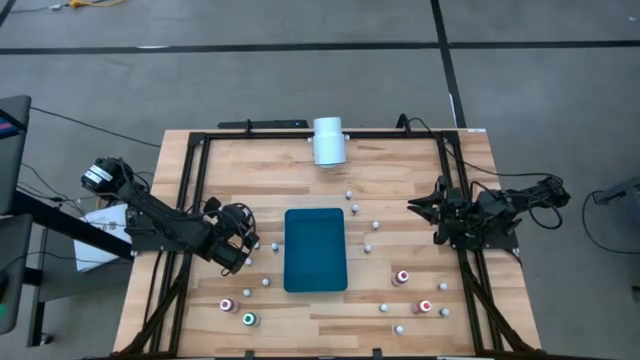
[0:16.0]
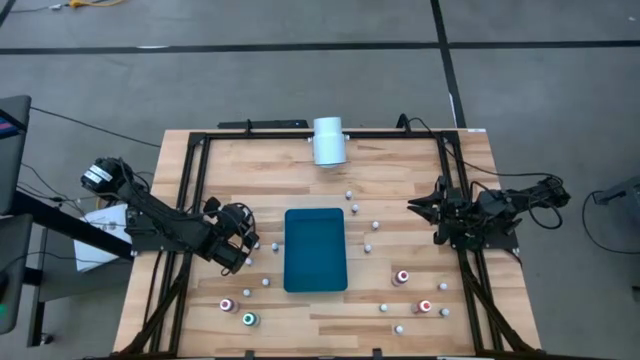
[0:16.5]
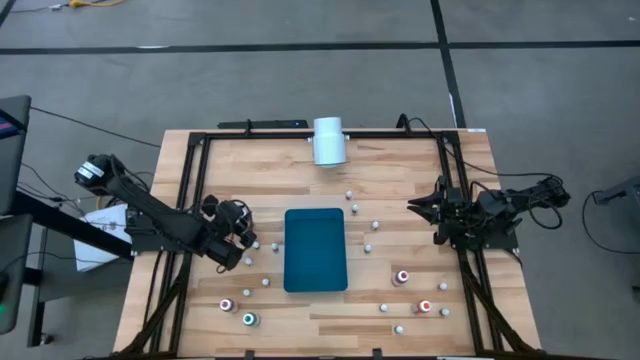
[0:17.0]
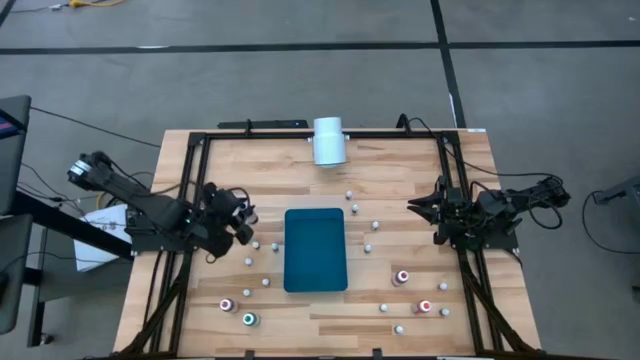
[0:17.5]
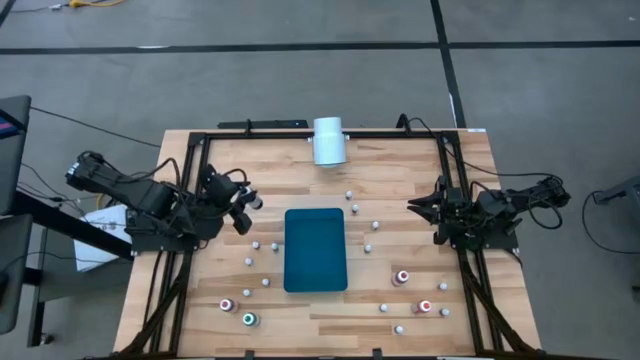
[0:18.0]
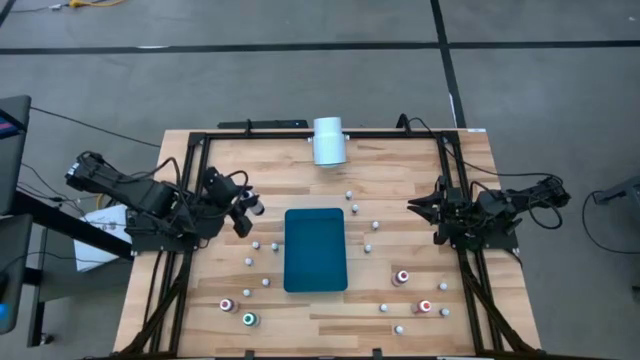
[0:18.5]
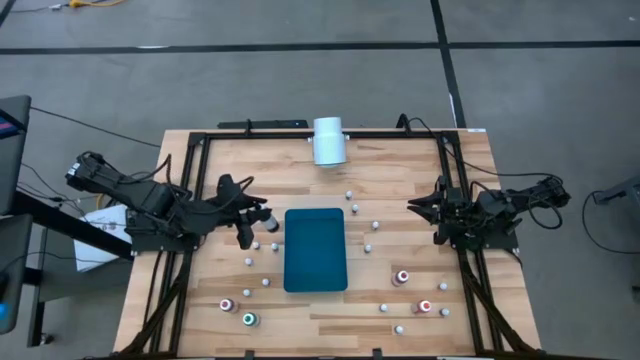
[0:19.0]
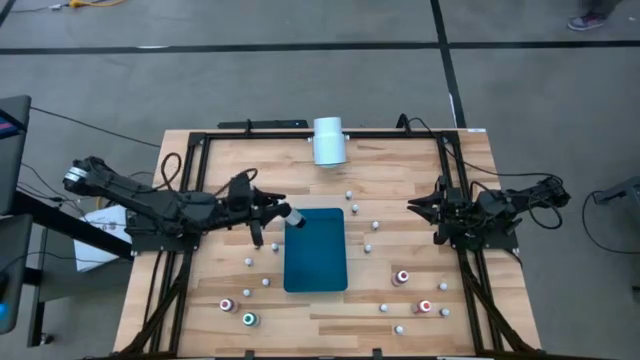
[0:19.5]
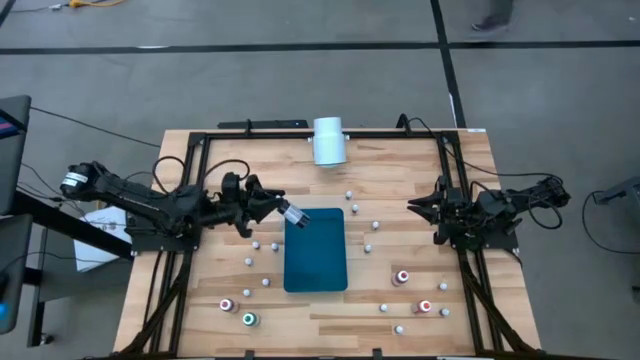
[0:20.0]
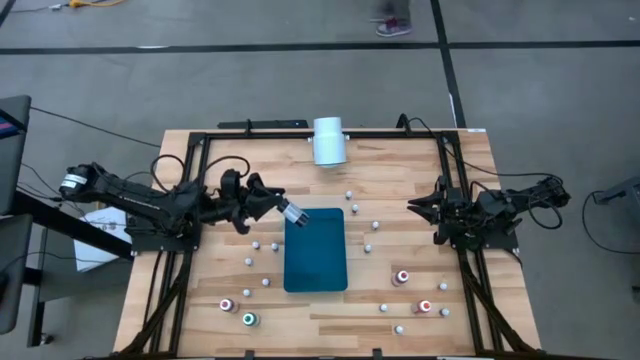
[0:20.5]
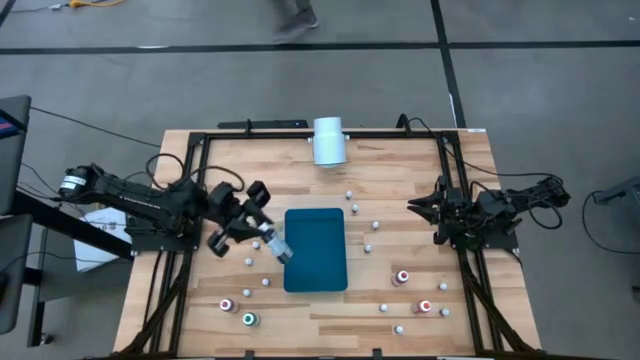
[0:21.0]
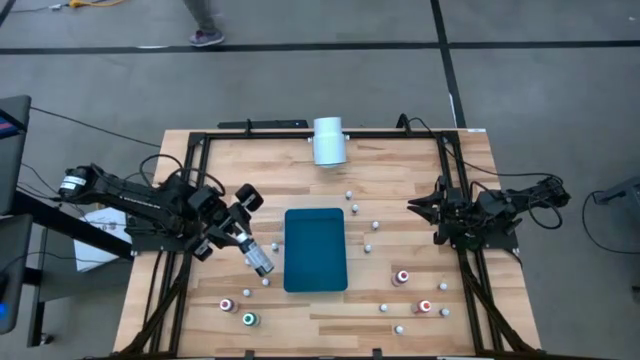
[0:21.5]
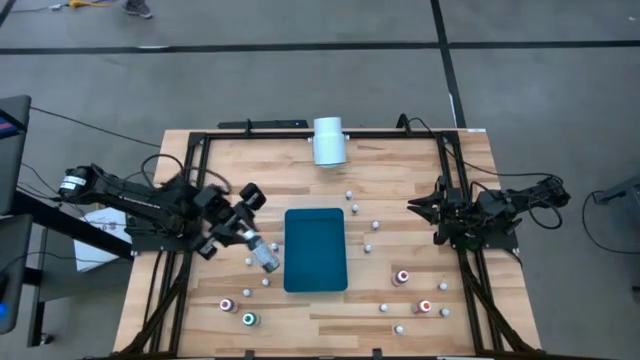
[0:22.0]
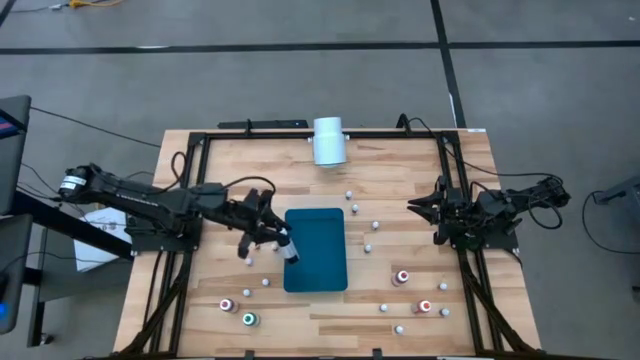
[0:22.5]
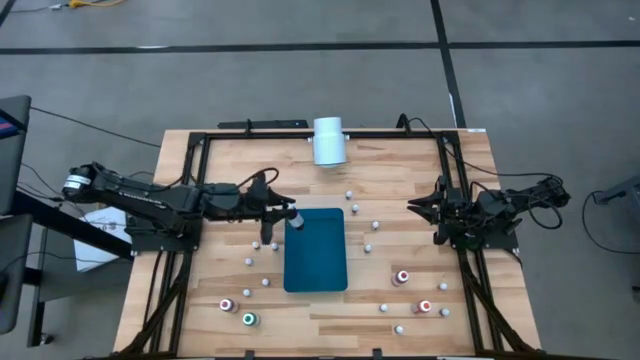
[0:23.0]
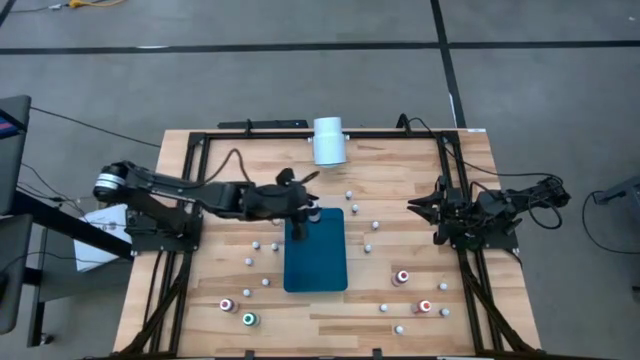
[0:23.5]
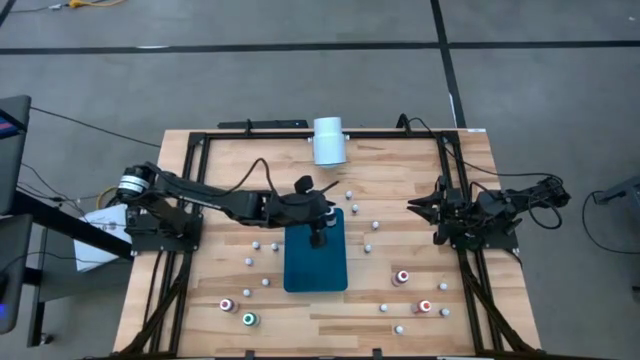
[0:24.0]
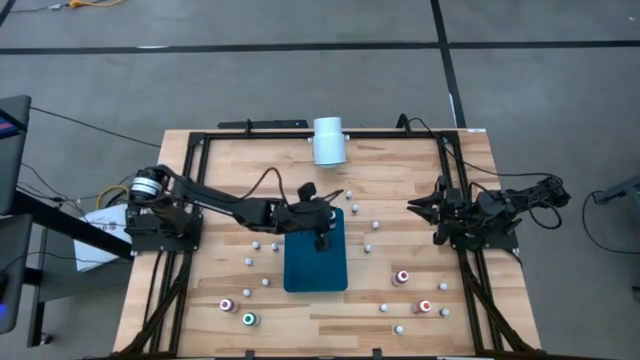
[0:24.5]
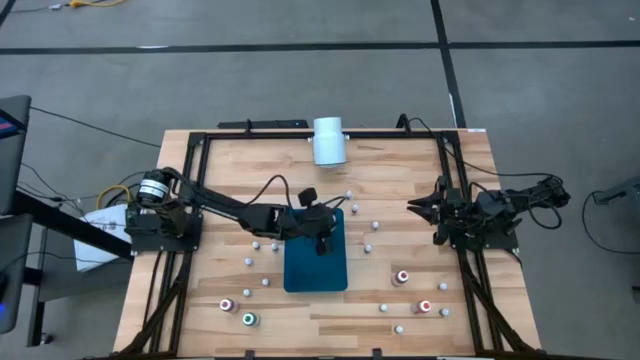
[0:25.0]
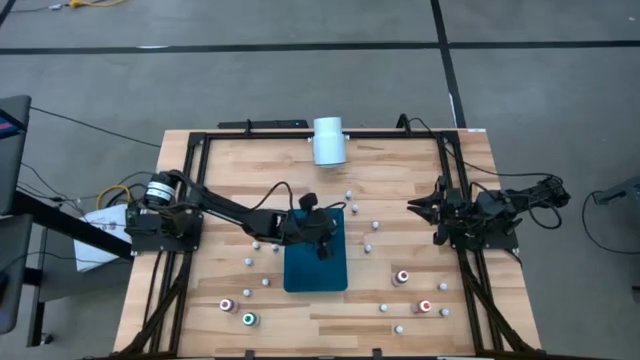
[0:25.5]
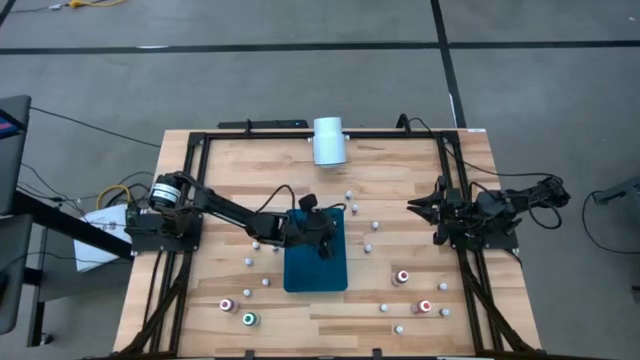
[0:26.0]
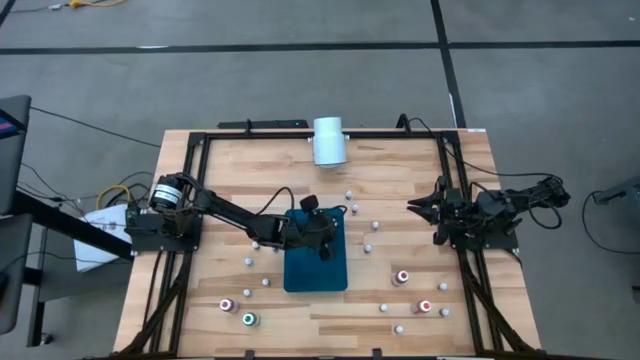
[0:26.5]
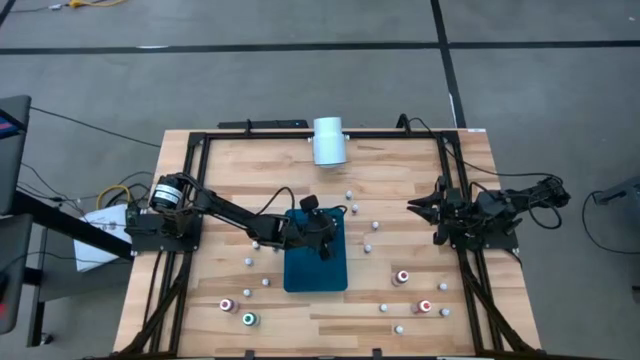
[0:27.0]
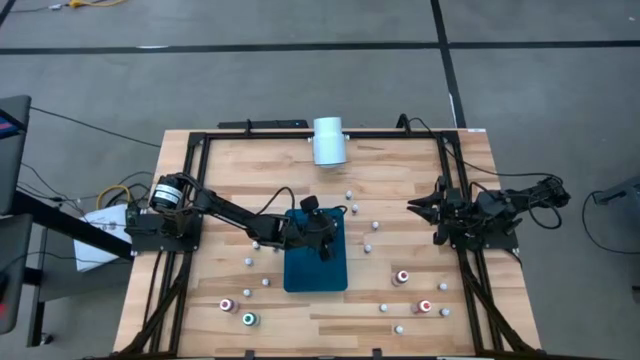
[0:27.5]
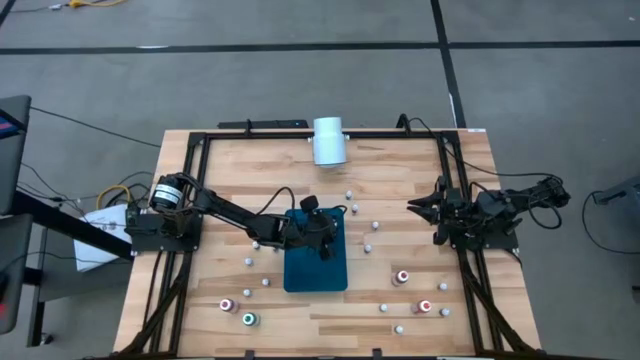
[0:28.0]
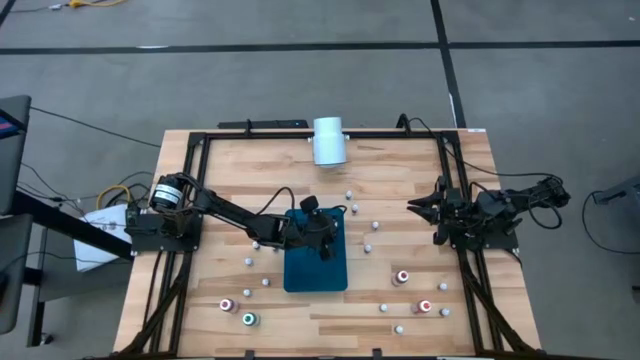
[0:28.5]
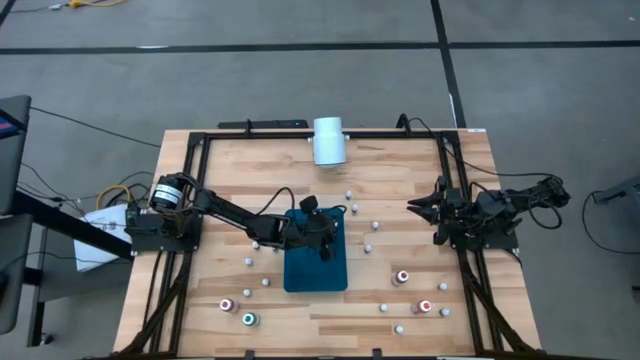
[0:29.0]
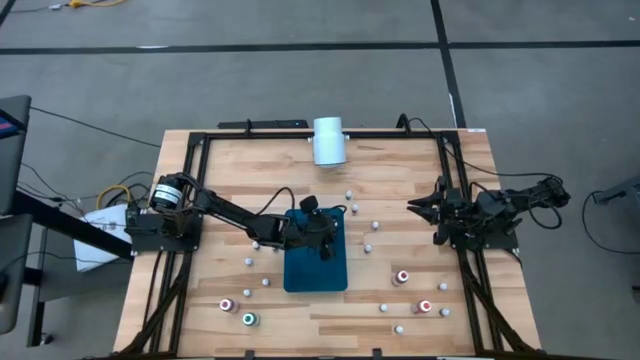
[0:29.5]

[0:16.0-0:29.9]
Task: Pick & Place food coloring
Put the big black food coloring bottle into the blue bin

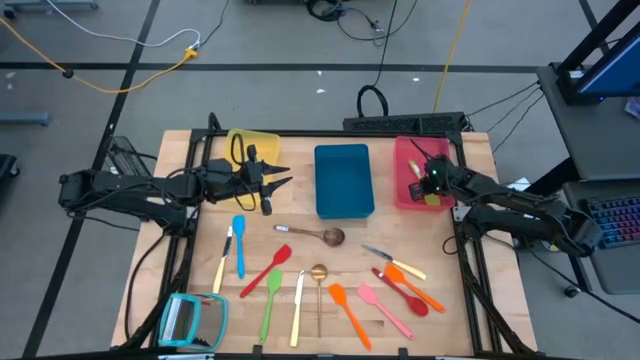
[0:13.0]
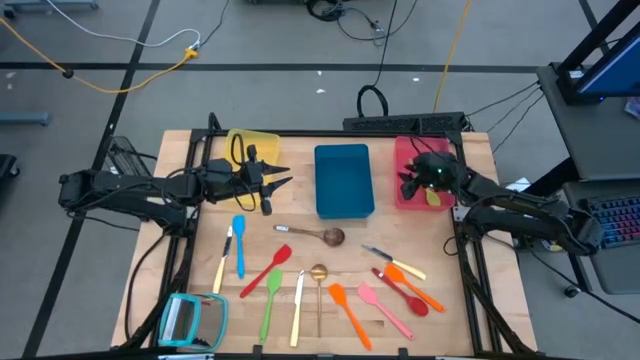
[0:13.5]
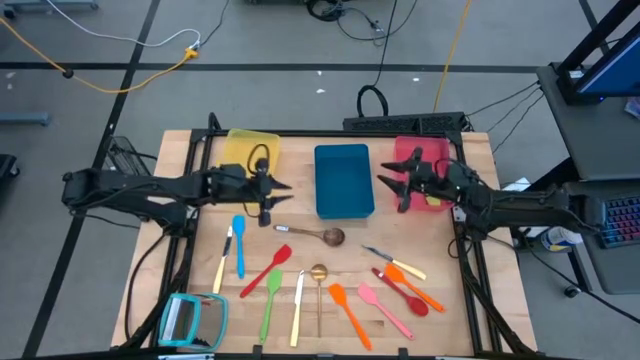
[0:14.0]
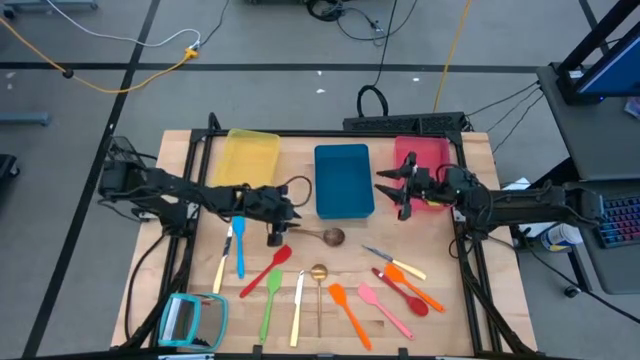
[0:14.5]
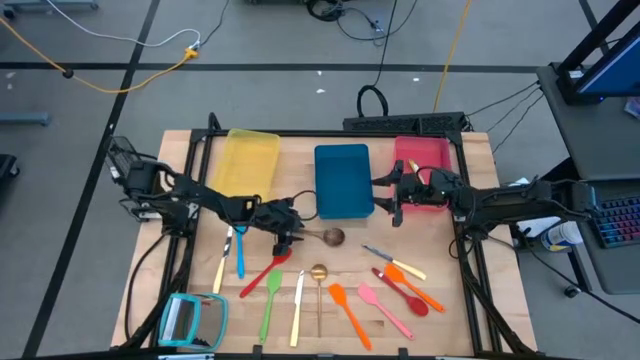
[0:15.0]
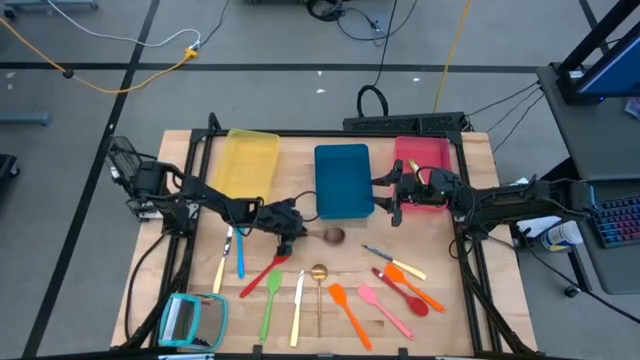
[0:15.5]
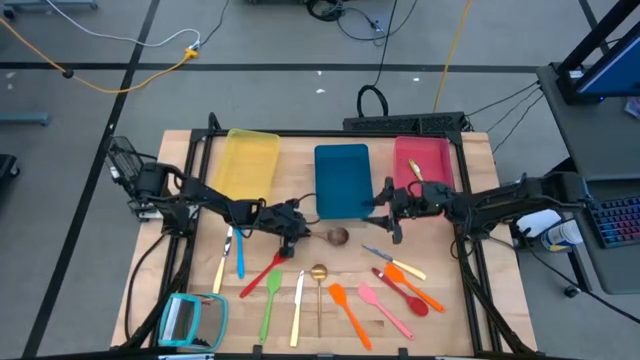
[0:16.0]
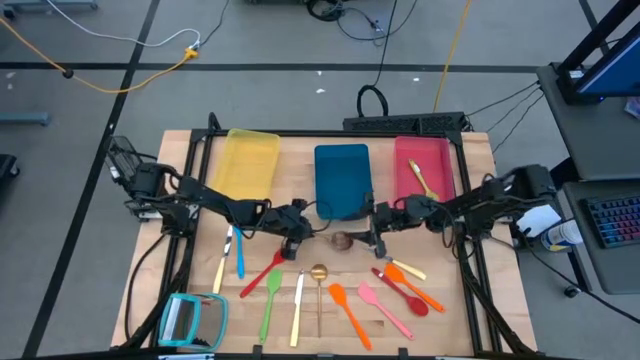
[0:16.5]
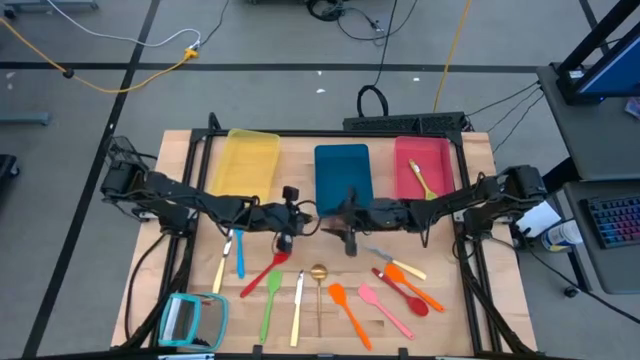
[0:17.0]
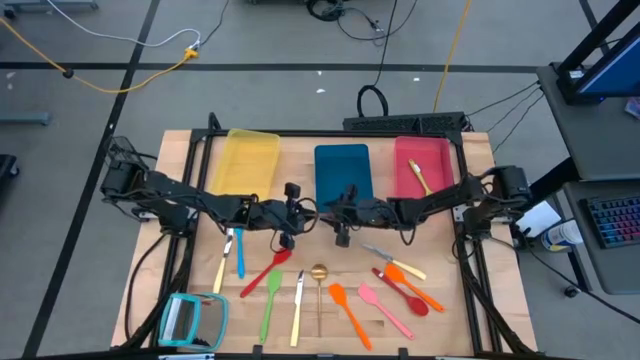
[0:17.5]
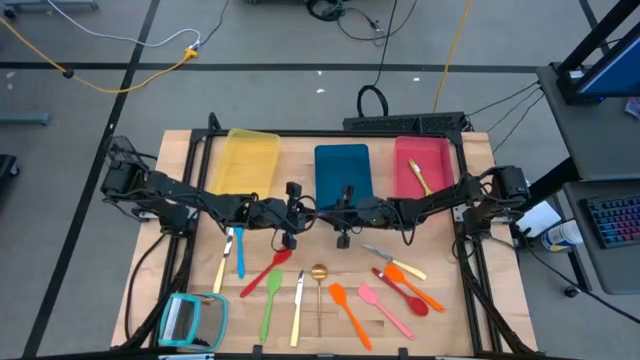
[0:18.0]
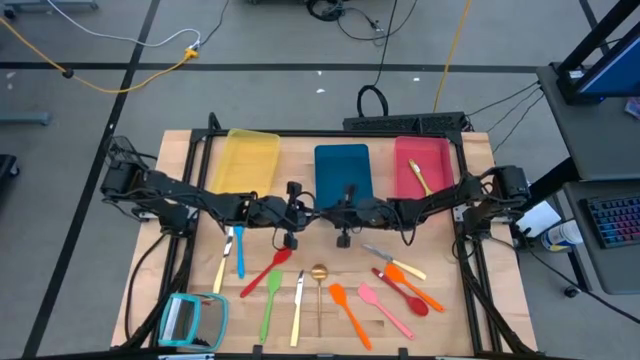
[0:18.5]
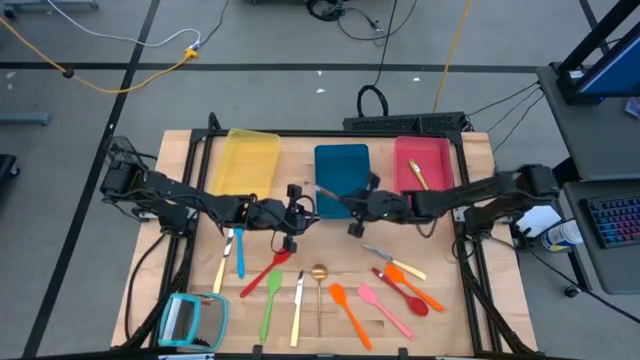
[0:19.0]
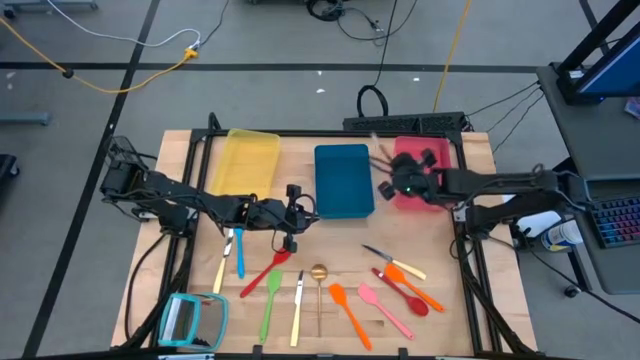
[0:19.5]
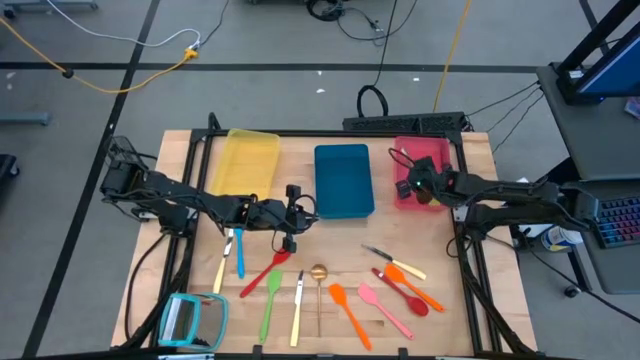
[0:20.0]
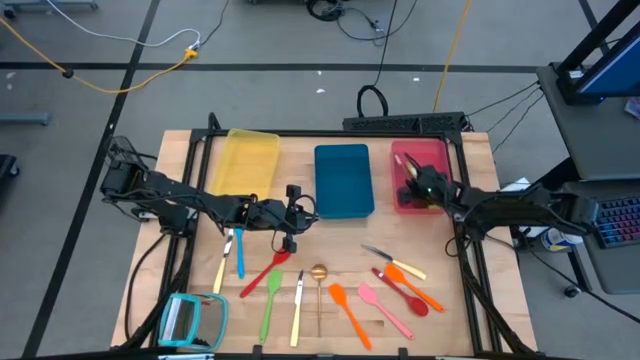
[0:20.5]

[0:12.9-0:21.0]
Task: Pick & Place Kitchen Items
Put the brown serving spoon into the red bin
